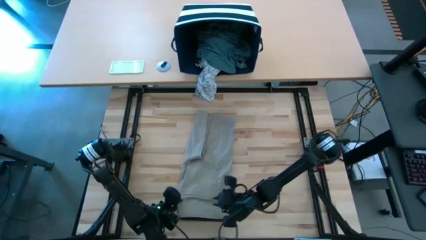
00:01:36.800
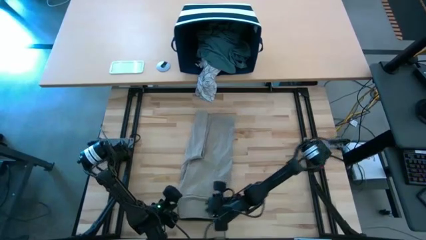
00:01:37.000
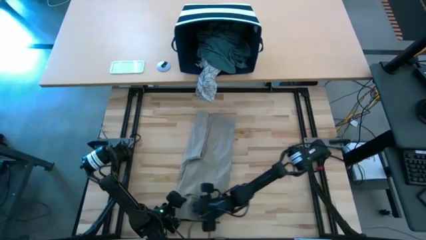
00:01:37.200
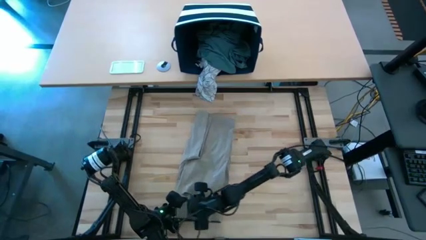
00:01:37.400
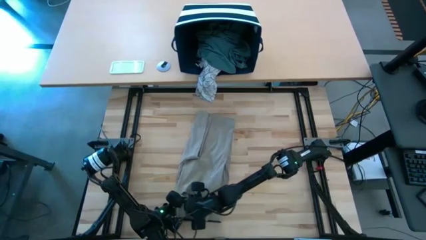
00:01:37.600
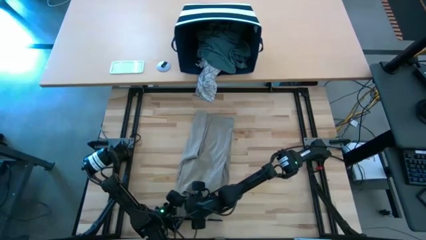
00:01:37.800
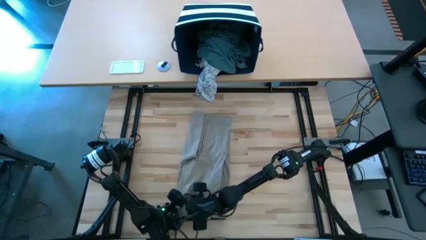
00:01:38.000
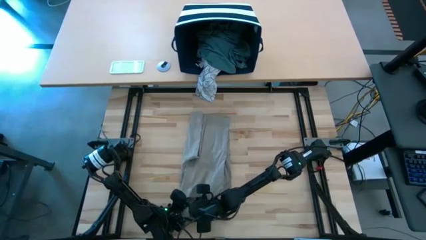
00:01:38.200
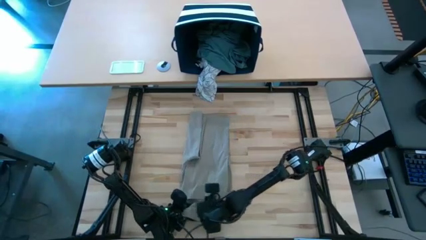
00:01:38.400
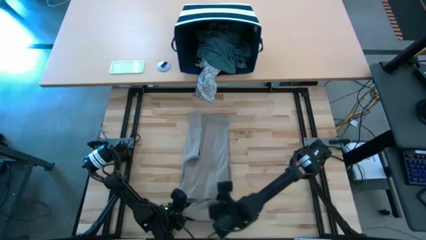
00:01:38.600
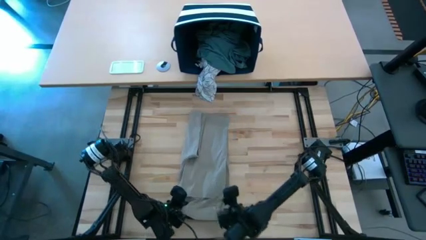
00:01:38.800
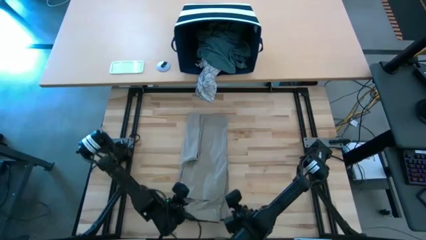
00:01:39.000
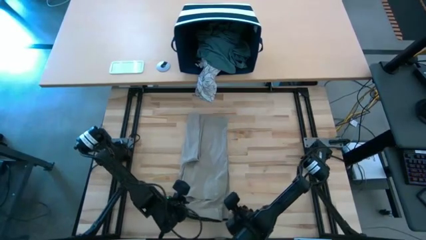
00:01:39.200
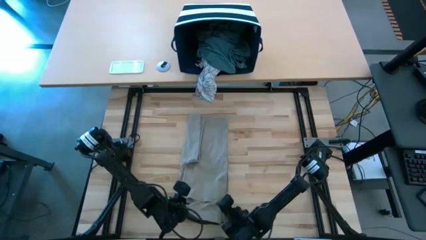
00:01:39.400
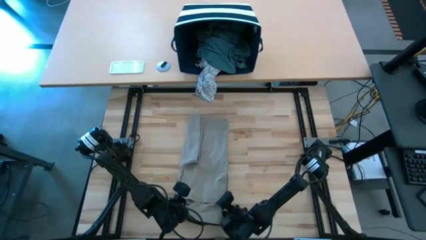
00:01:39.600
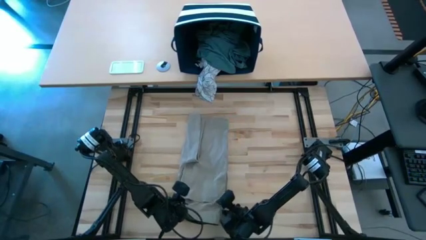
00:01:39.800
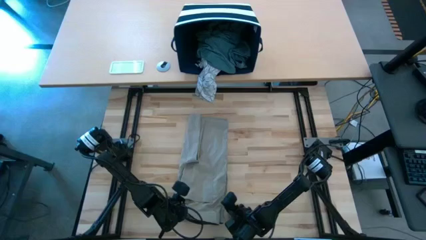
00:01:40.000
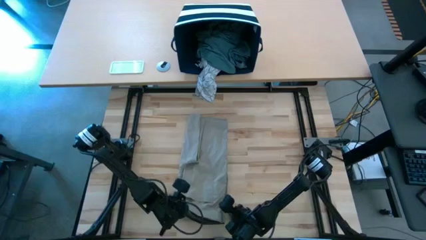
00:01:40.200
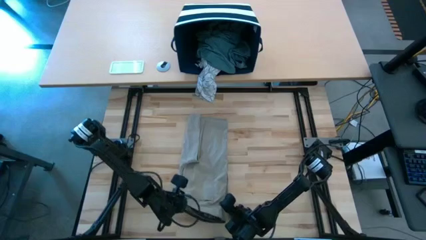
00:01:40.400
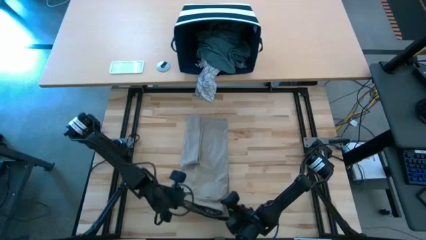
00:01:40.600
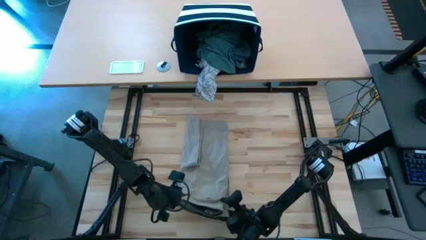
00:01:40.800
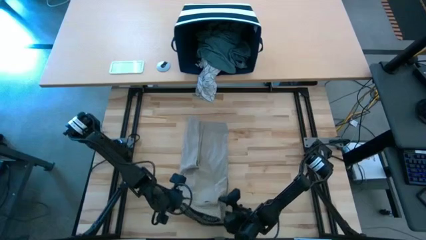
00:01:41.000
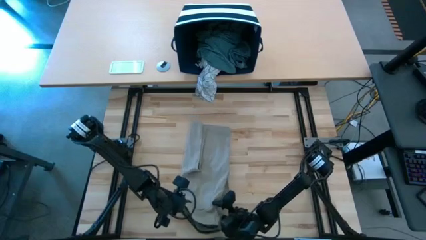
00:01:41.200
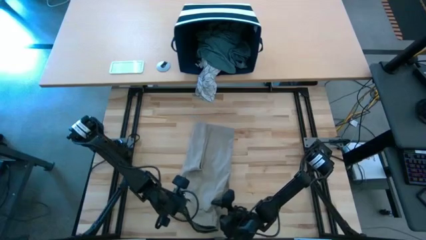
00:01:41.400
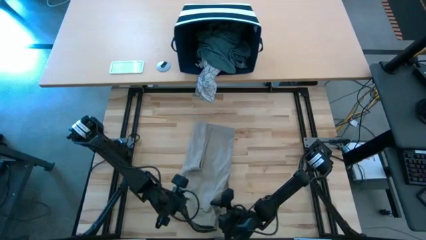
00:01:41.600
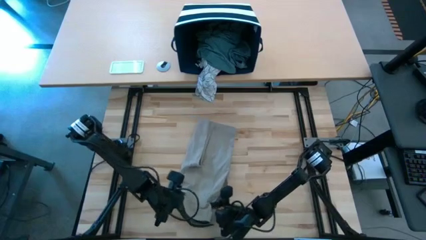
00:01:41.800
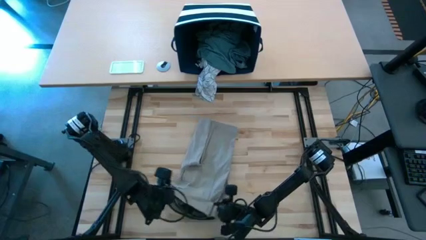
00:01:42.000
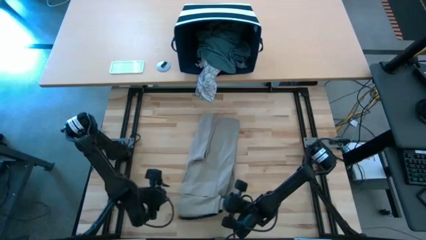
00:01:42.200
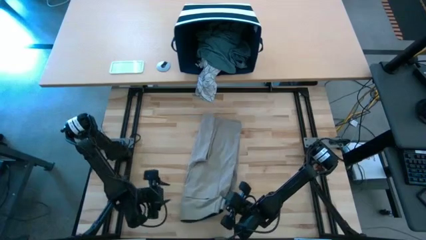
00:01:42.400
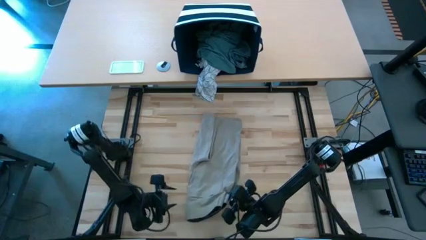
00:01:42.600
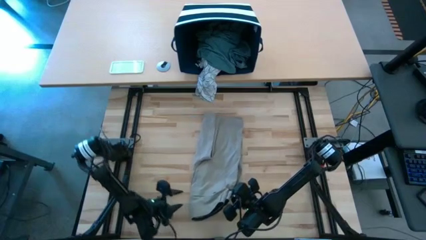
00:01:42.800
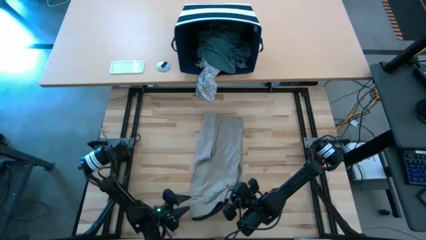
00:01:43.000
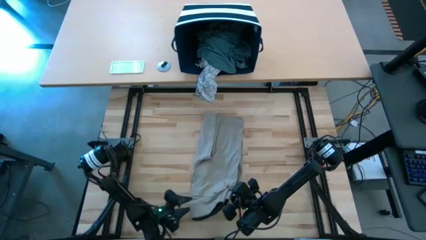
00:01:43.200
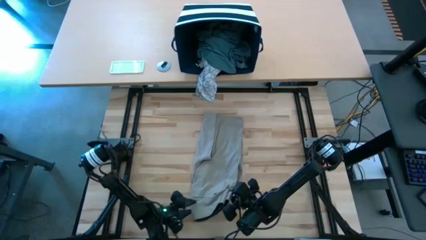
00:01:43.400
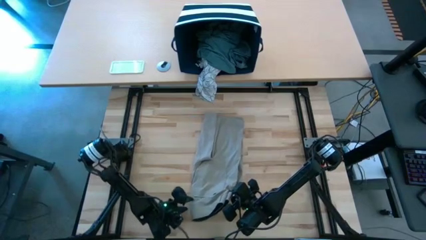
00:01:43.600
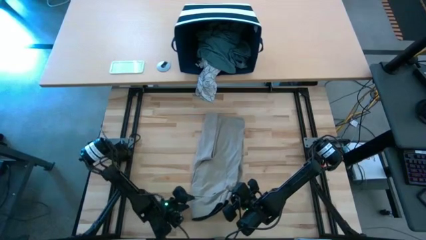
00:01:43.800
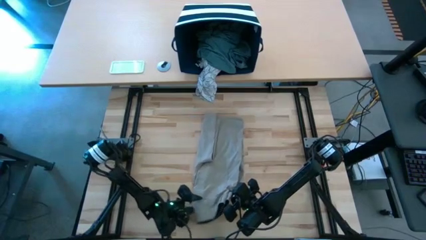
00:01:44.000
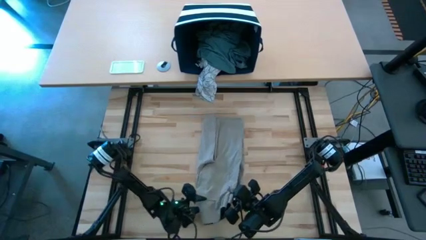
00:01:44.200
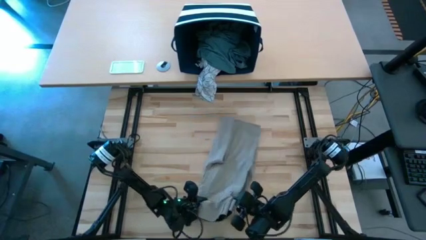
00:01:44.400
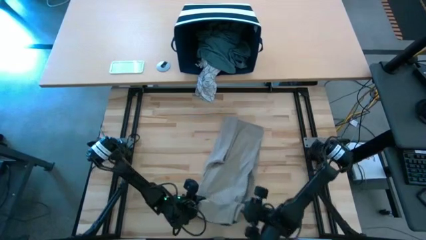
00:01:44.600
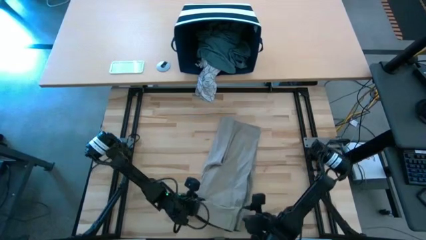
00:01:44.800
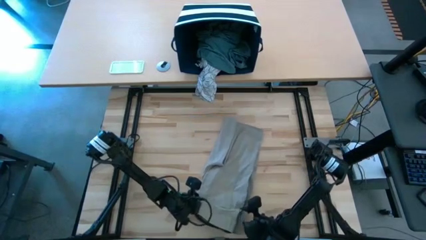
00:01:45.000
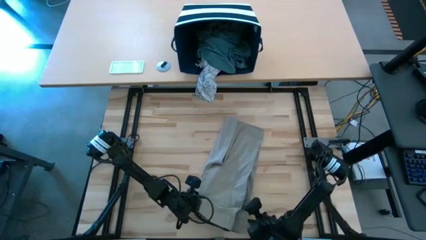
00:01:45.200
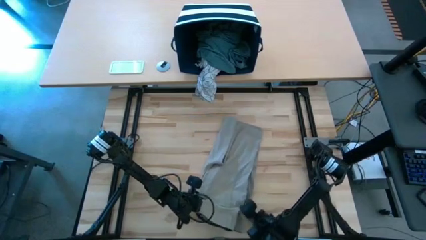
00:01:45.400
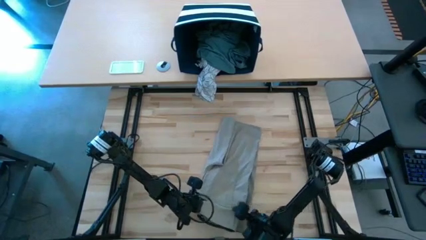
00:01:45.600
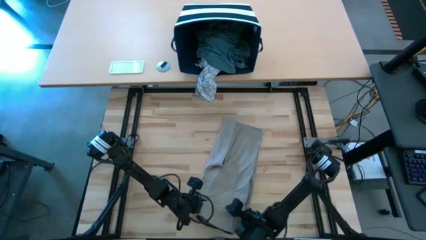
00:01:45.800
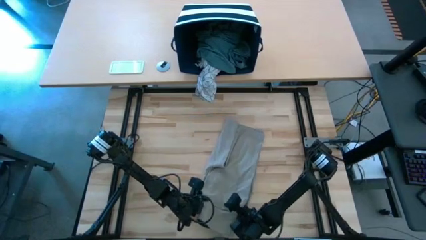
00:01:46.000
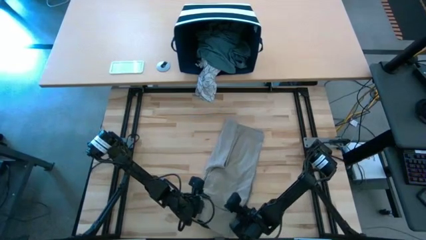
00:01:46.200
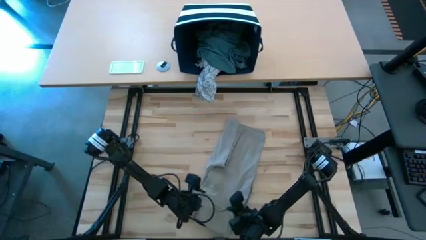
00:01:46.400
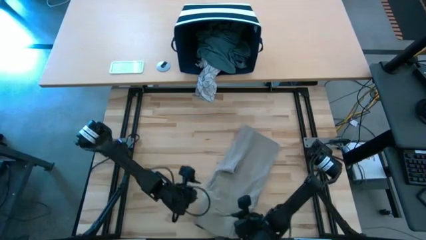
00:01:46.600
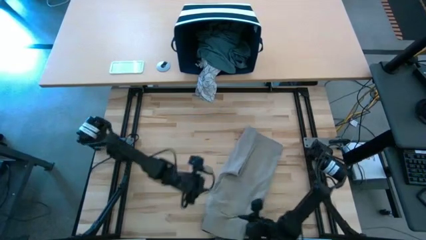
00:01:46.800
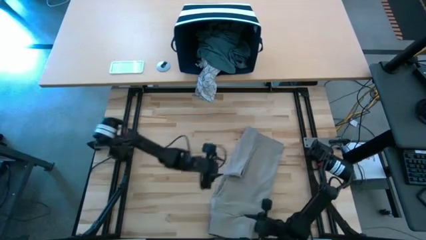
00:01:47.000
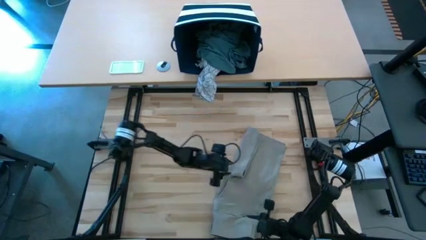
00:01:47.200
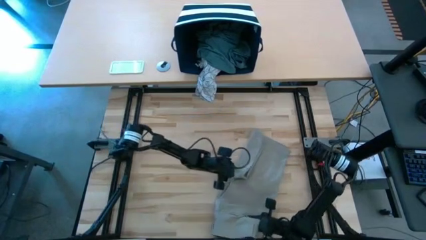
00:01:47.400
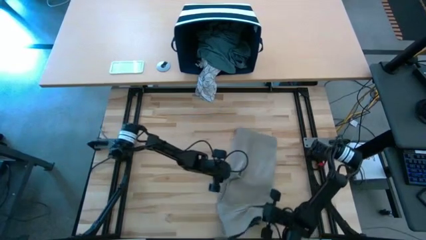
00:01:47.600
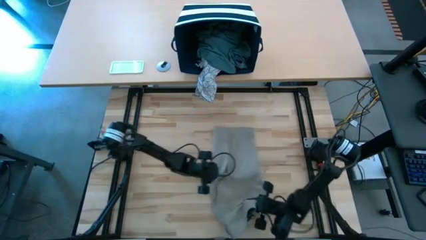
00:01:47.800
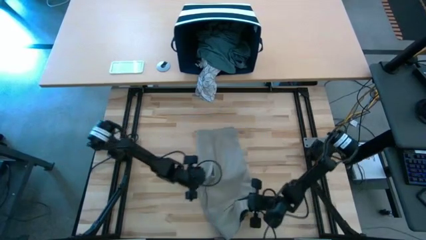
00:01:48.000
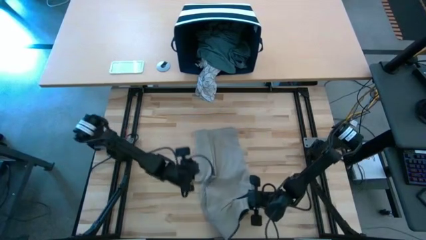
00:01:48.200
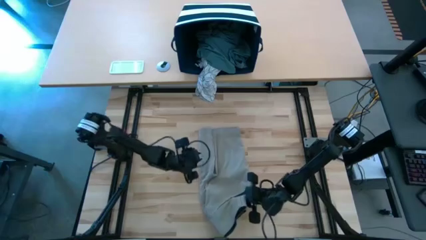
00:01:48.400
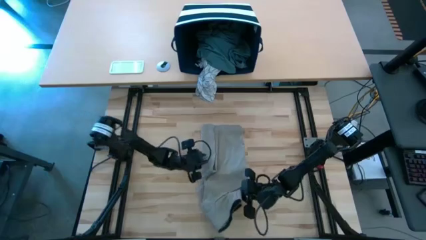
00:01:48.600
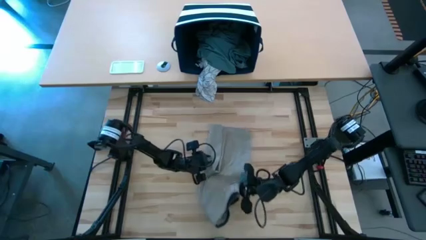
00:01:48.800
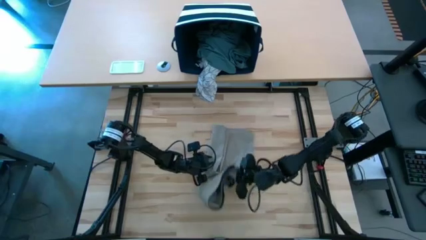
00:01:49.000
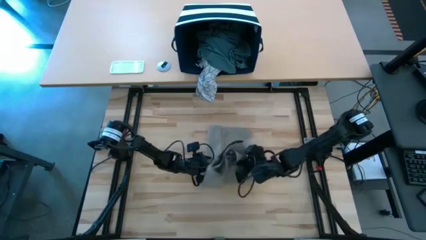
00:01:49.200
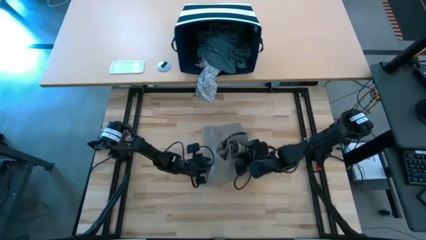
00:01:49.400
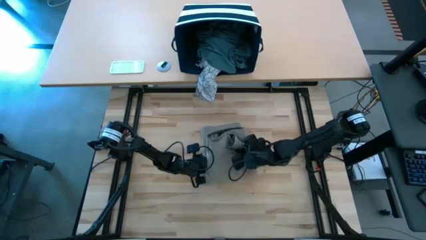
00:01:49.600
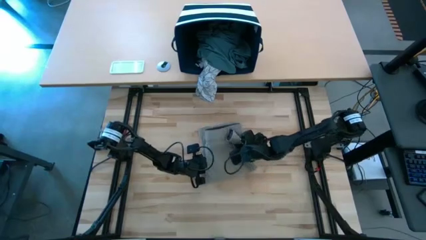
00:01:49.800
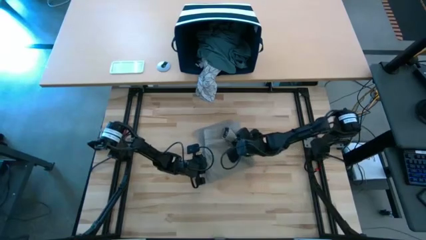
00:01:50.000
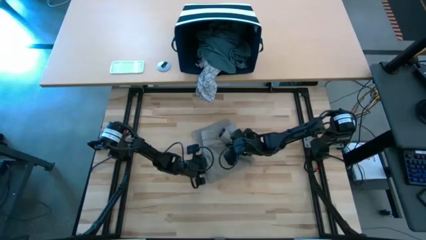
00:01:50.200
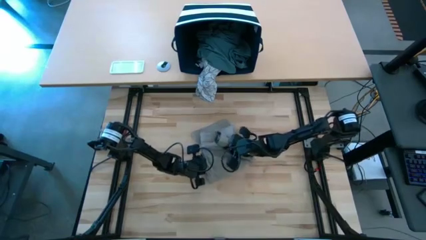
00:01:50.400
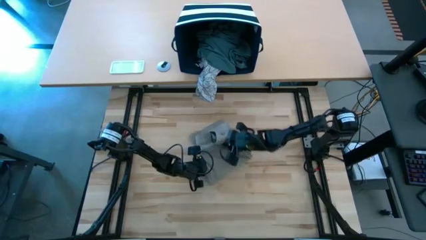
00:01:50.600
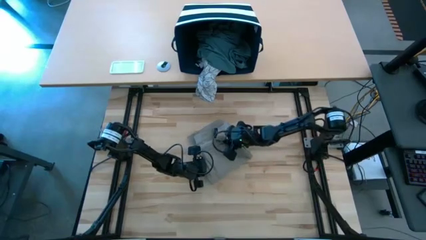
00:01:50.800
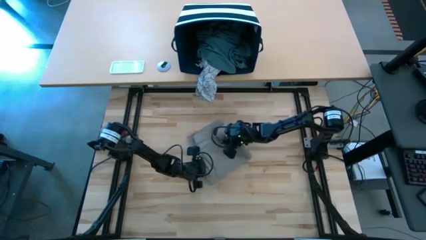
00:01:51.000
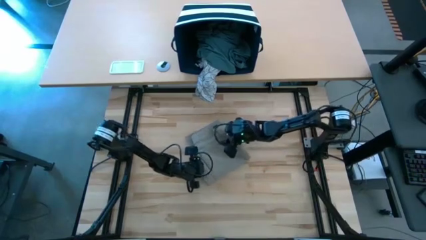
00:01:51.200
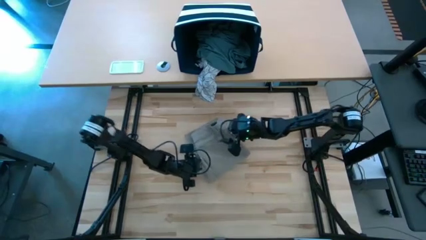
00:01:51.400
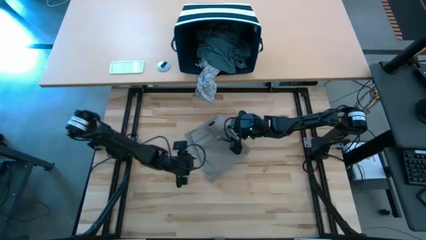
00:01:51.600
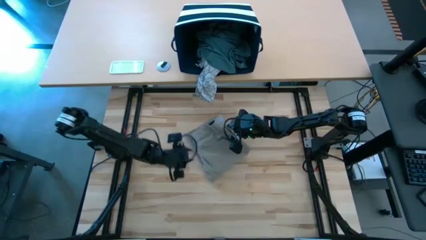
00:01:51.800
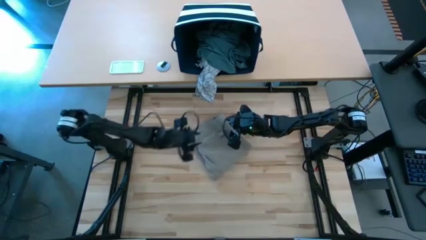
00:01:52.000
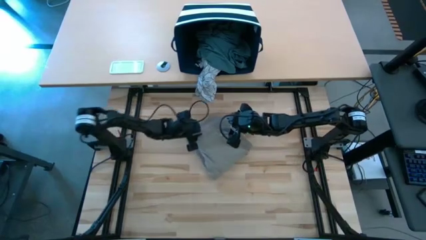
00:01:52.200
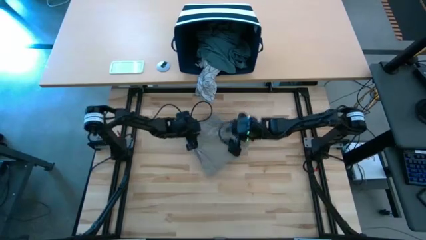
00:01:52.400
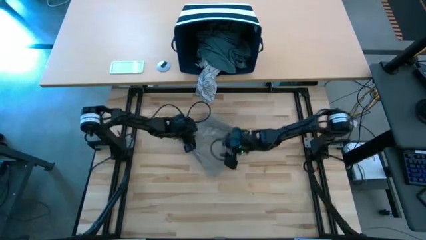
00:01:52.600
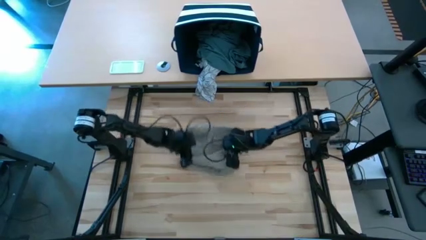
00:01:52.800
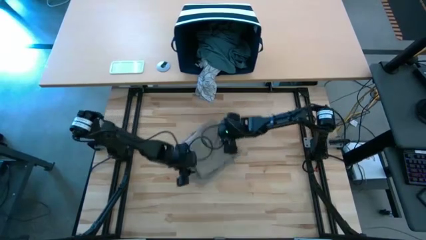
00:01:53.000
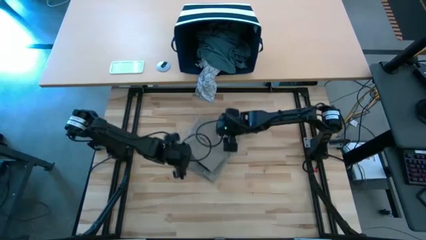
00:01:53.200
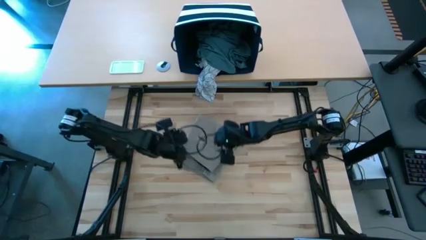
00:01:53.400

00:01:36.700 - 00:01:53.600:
Task: Fold Laundry from Bin
Fold the brown shorts from the blue laundry basket
